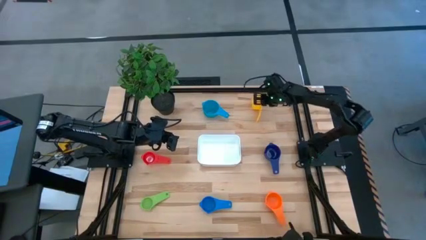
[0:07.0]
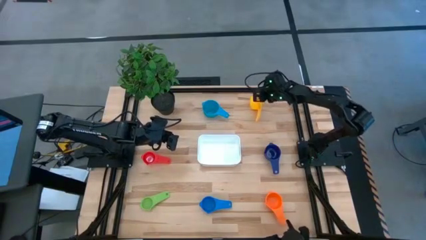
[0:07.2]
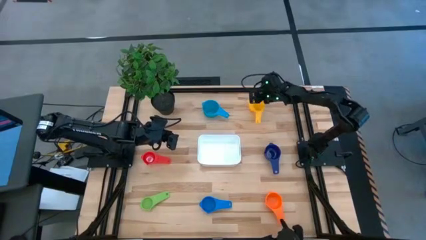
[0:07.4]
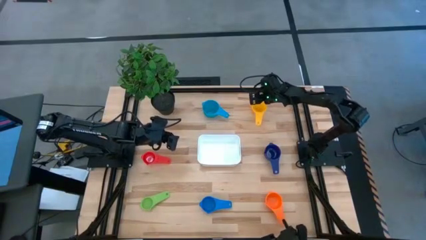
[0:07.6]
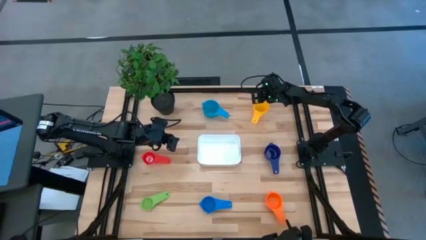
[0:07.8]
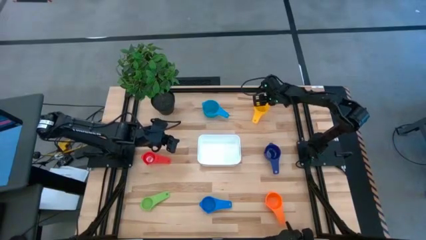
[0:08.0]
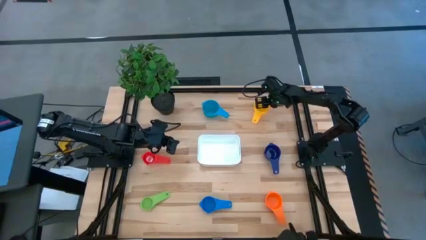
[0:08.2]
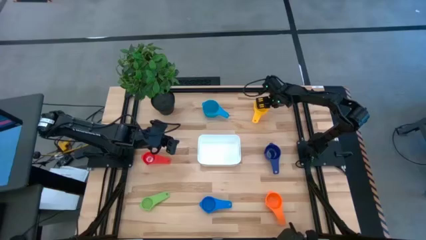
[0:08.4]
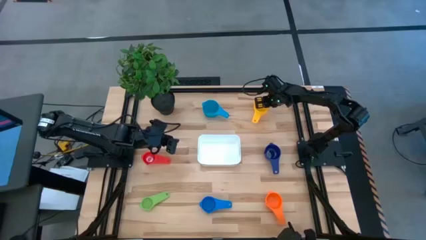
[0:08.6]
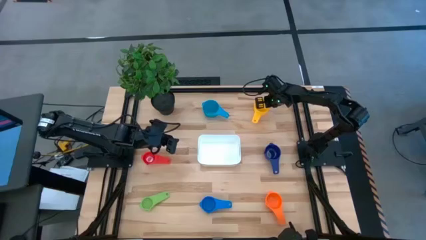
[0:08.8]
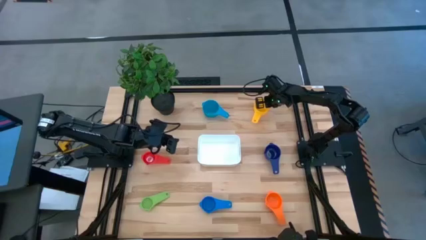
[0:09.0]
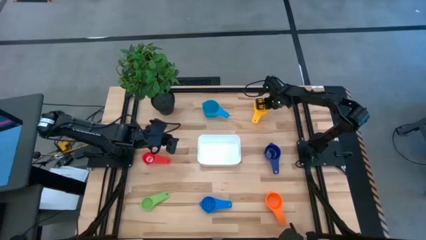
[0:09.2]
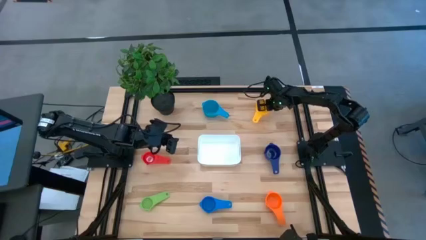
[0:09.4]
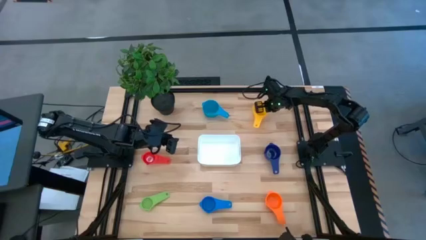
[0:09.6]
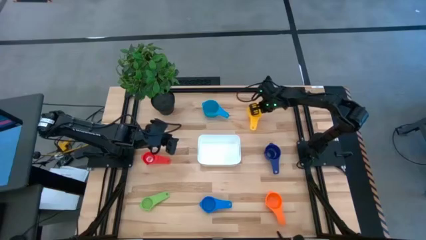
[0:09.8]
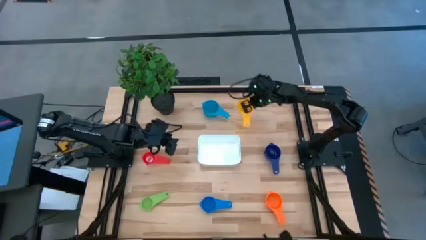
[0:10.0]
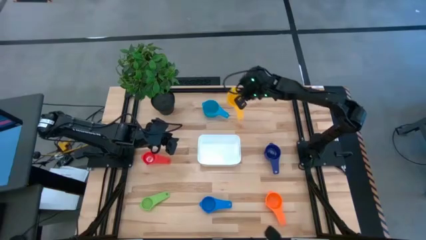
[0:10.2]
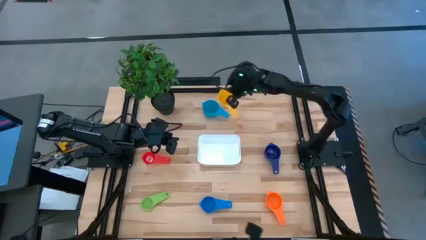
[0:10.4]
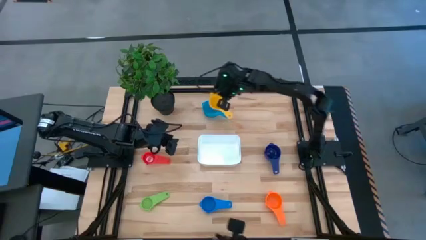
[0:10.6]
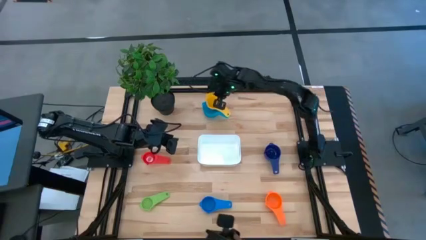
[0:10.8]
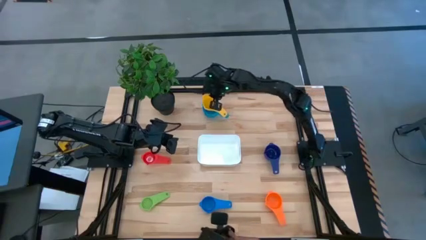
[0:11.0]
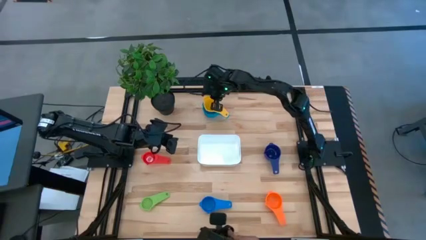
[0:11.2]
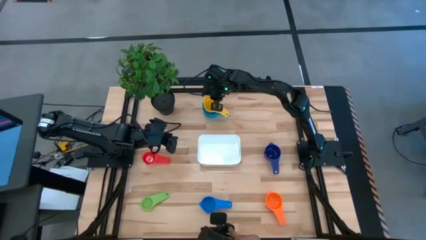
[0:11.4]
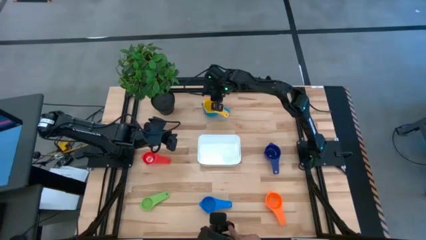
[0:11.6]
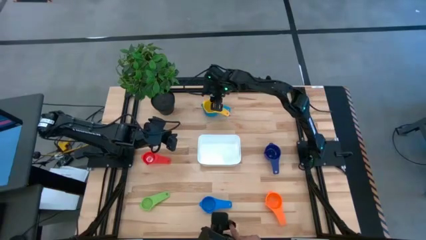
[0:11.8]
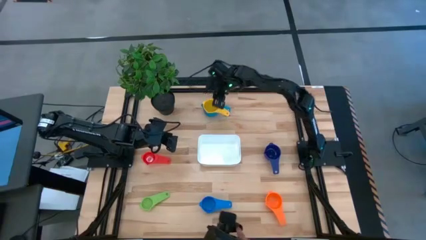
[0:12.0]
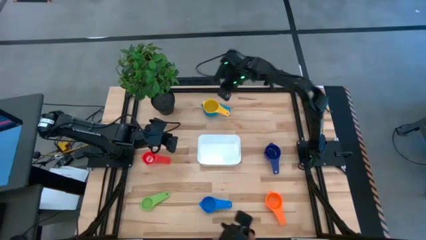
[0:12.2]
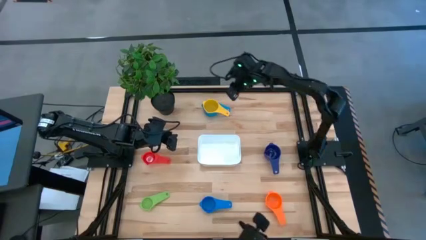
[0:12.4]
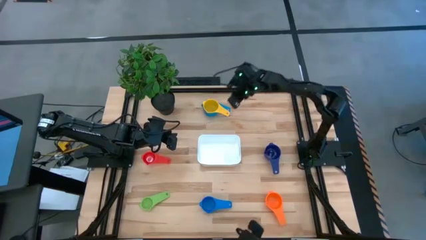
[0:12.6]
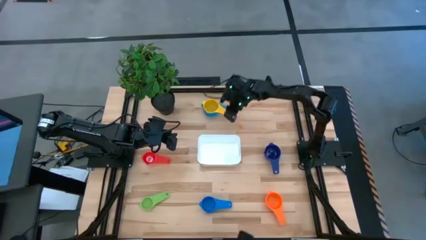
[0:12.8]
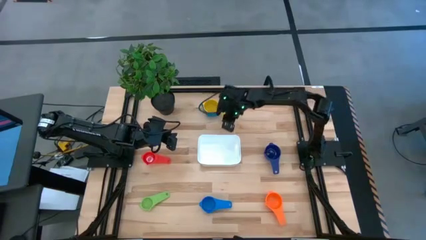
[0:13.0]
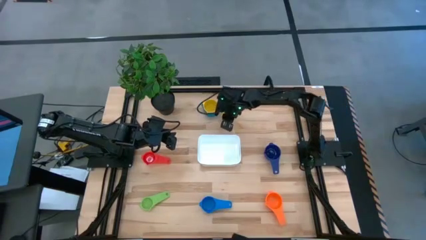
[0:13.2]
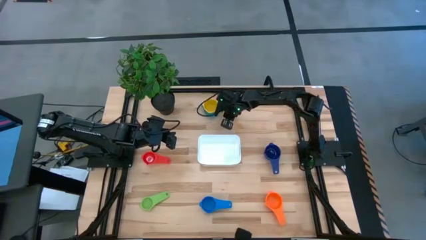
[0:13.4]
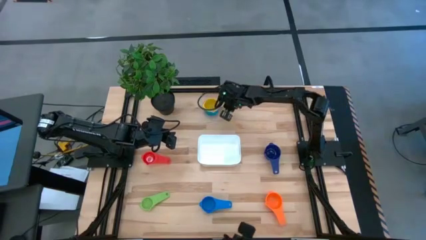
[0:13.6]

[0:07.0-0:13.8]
Task: Nest measuring cups in basket
Stack the yellow measuring cup on top of the light blue measuring cup

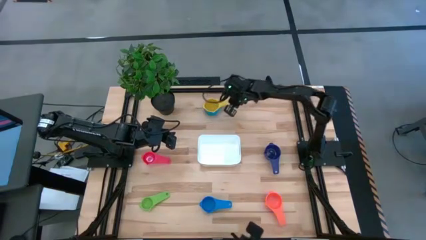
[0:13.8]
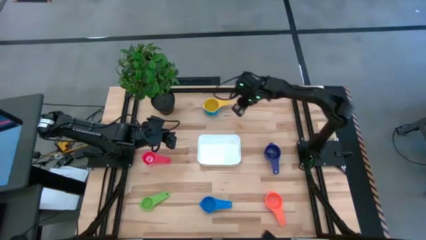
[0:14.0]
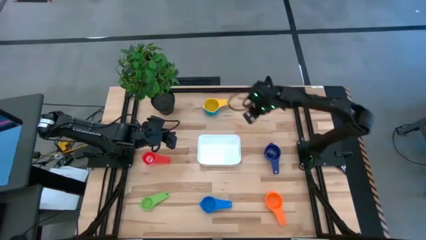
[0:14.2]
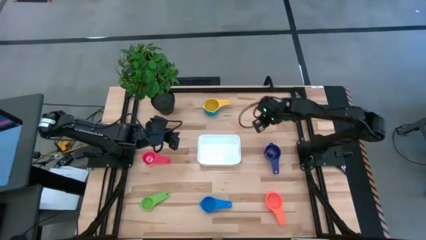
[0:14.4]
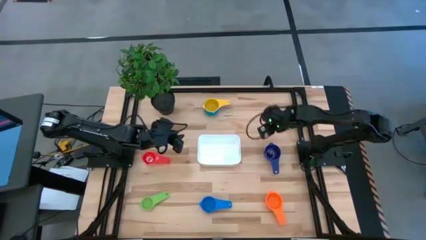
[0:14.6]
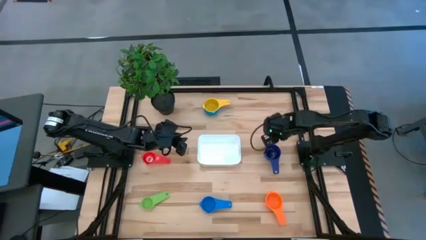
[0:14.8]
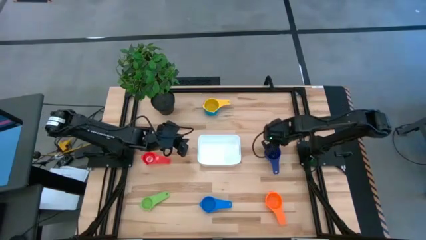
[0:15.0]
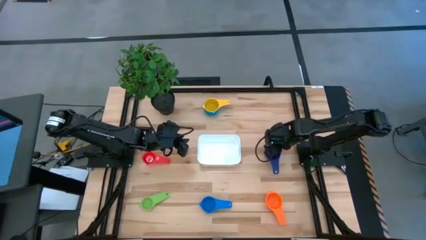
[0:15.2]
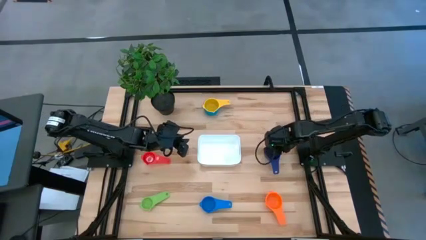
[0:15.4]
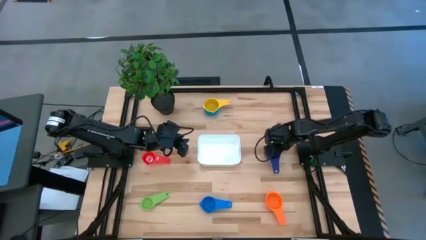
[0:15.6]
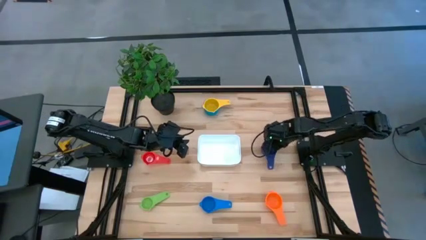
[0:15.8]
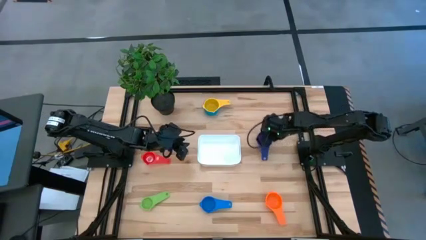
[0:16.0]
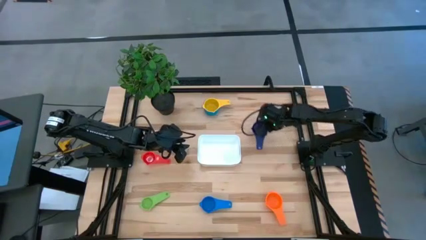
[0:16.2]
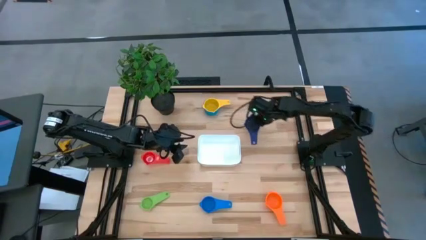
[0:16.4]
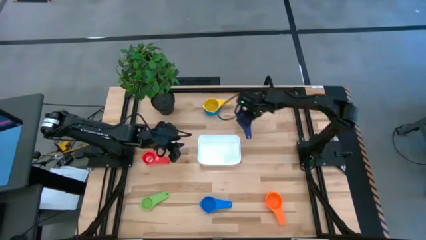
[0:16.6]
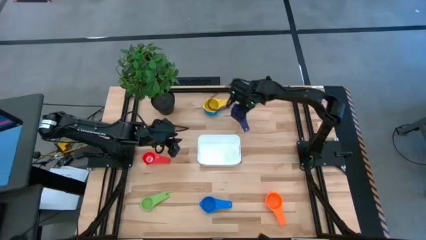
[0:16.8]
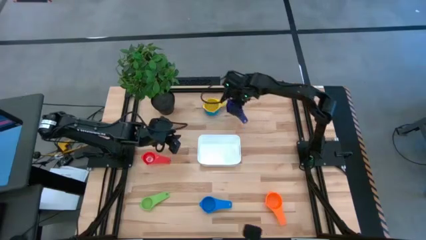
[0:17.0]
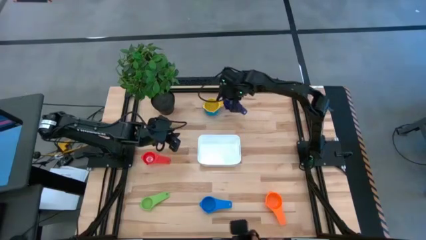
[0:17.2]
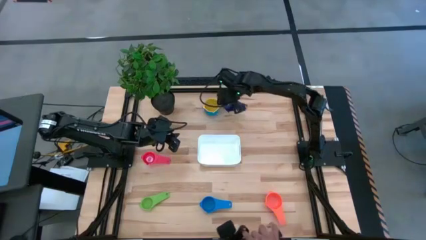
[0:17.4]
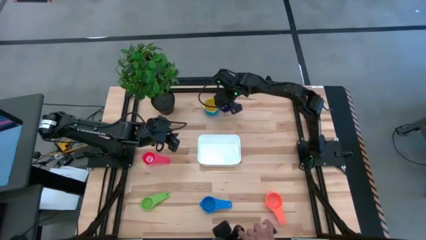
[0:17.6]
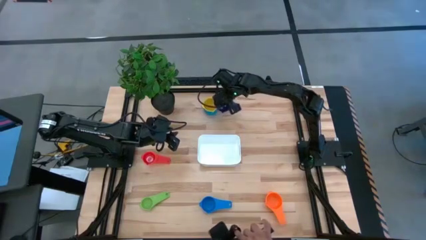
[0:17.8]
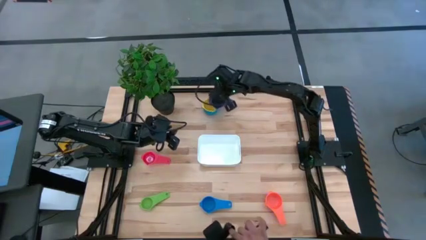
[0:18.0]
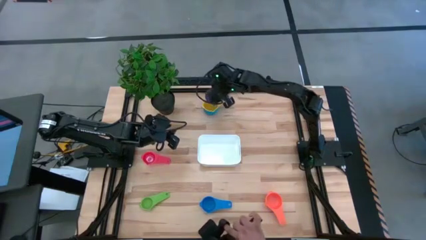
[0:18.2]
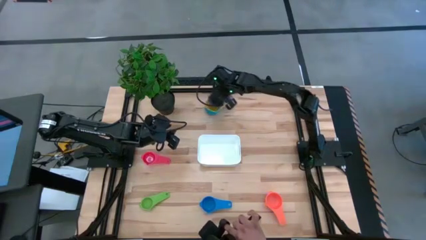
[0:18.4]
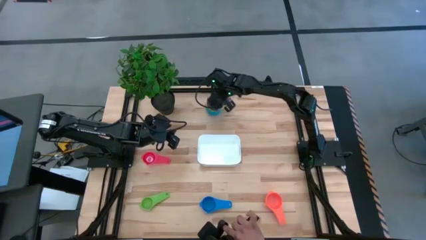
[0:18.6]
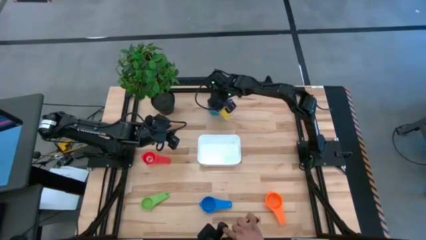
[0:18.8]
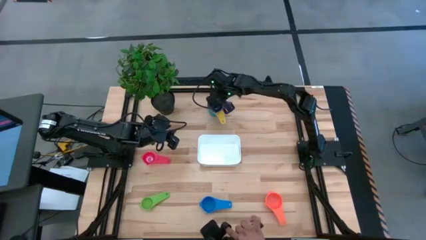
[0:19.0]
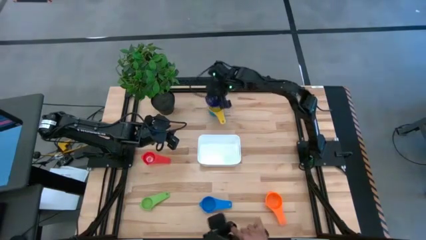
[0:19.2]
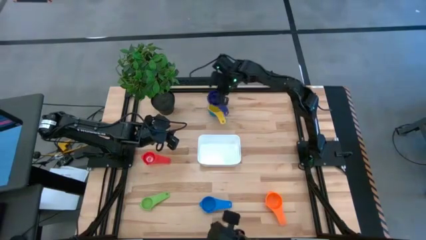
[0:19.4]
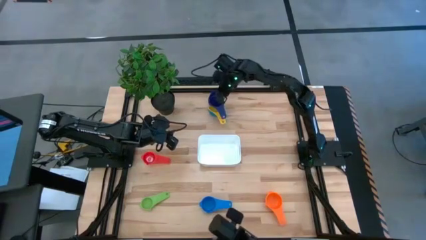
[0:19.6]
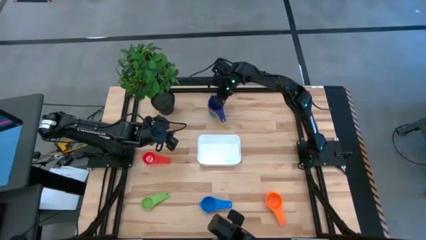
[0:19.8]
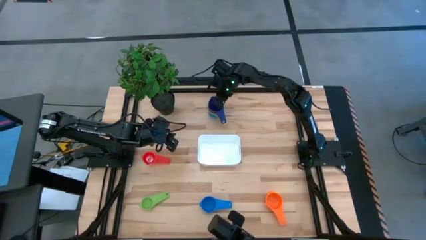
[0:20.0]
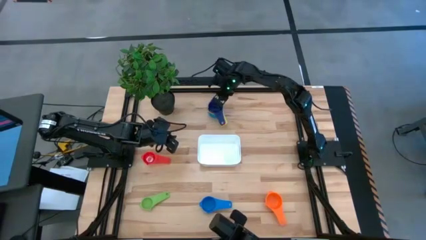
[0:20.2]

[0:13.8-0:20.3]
Stack the dark blue measuring cup on top of the yellow measuring cup

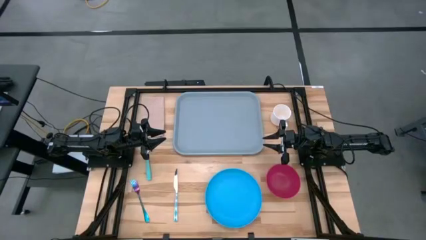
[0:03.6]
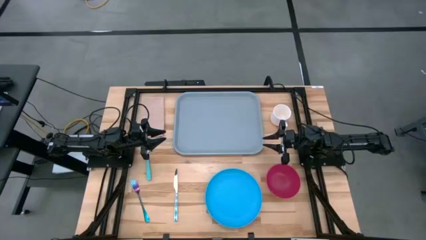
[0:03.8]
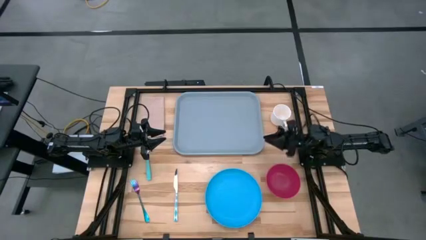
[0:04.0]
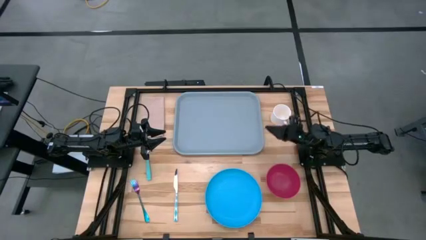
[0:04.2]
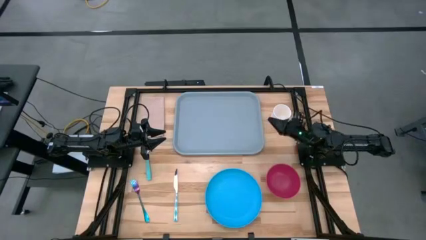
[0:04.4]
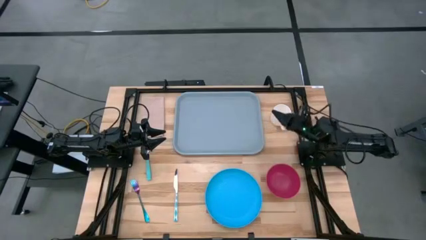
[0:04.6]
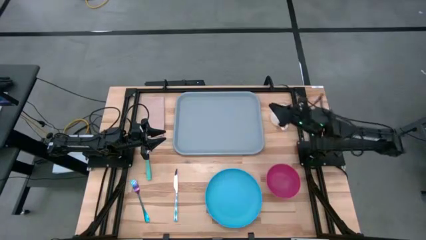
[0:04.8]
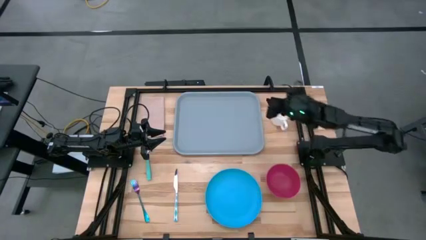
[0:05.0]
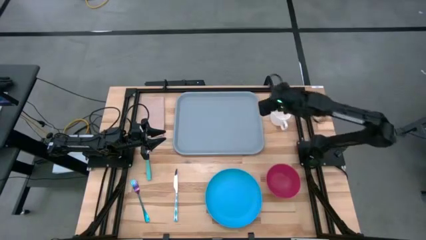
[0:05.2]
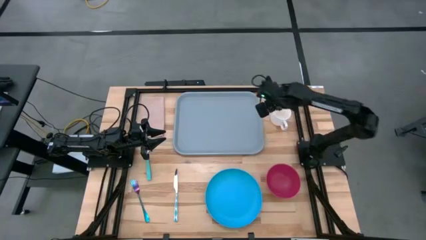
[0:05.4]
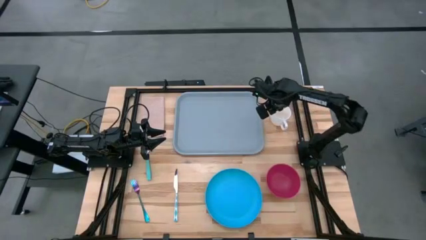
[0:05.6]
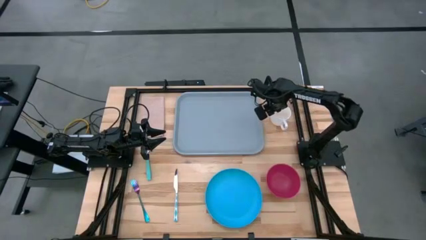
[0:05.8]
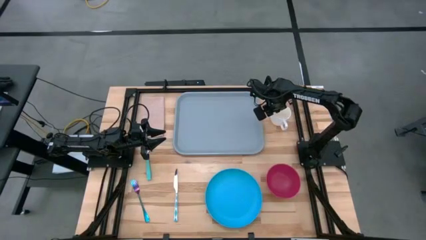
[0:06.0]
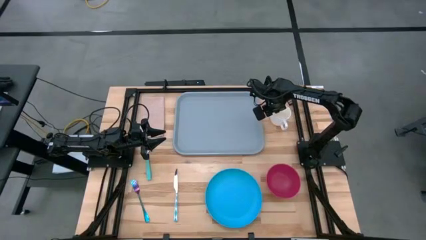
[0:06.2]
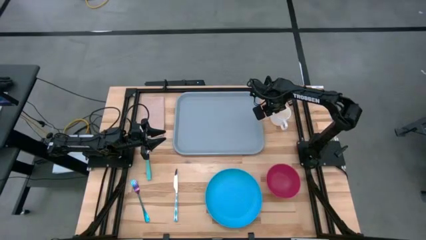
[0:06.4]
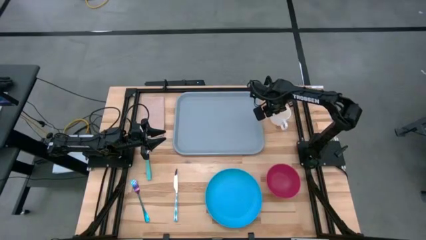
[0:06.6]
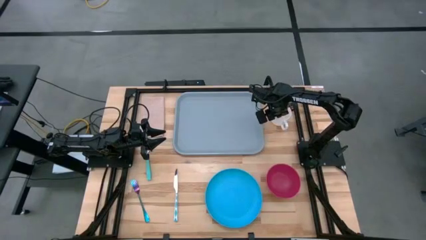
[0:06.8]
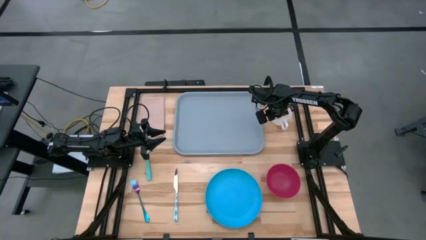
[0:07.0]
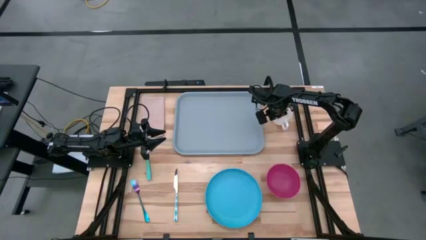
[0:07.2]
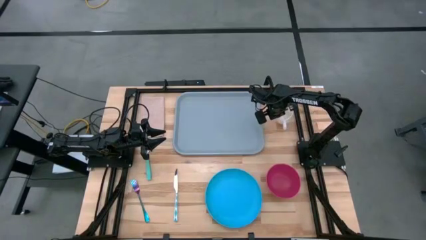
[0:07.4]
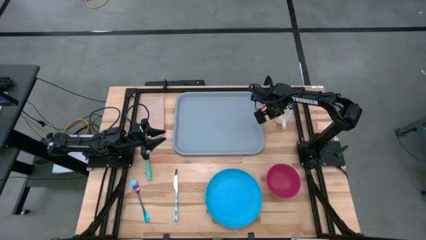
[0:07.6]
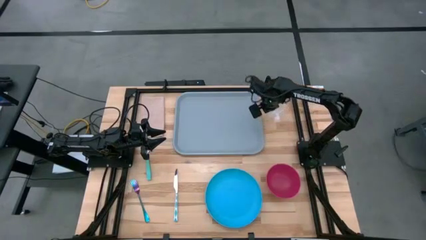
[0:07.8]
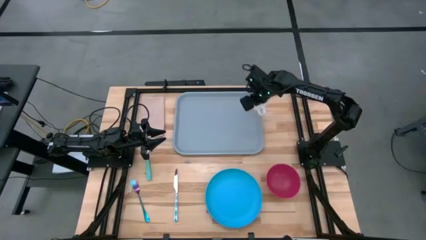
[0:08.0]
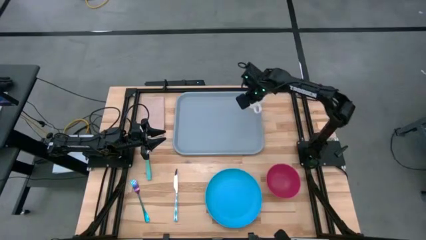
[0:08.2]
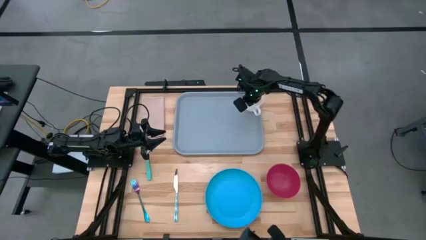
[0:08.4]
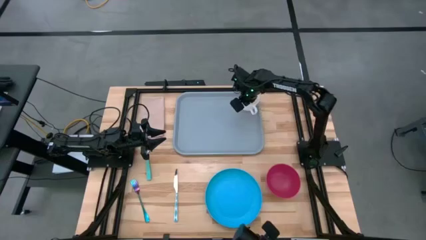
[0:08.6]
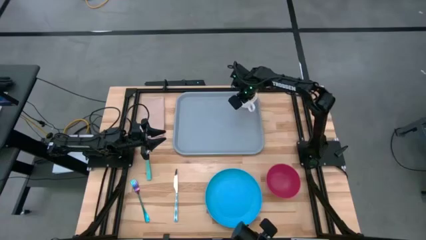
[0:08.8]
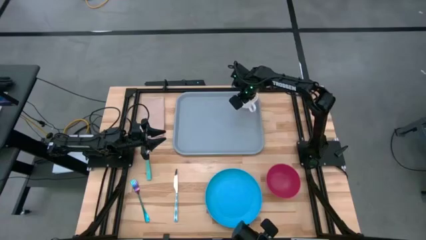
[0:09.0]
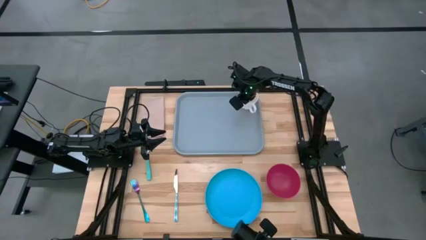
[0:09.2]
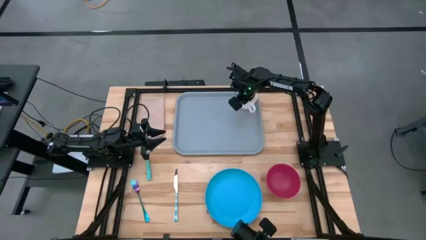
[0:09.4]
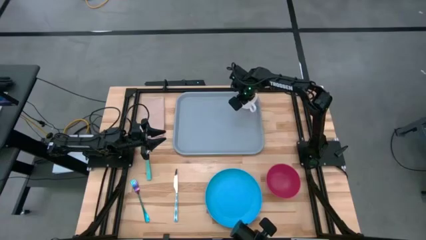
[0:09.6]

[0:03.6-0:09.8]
Task: Set up tray
Put the white mug on the gray serving tray
